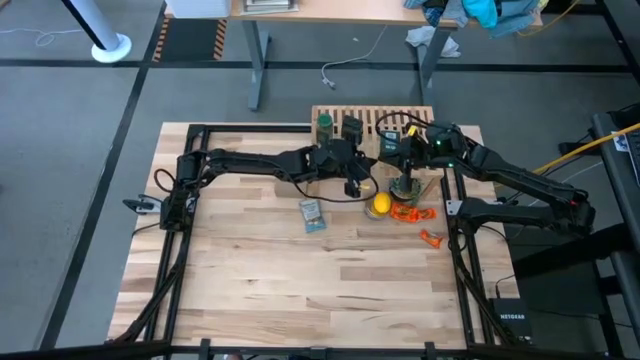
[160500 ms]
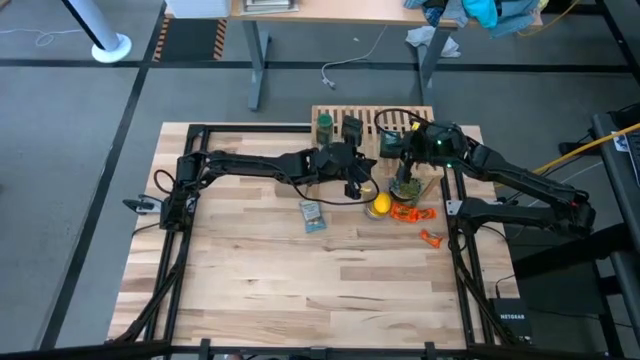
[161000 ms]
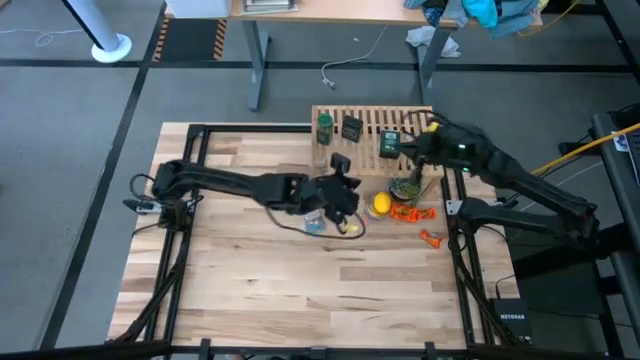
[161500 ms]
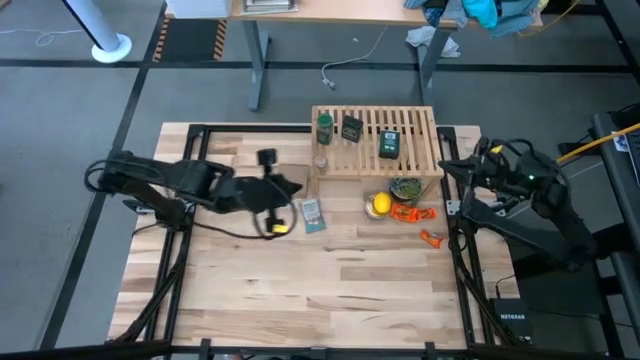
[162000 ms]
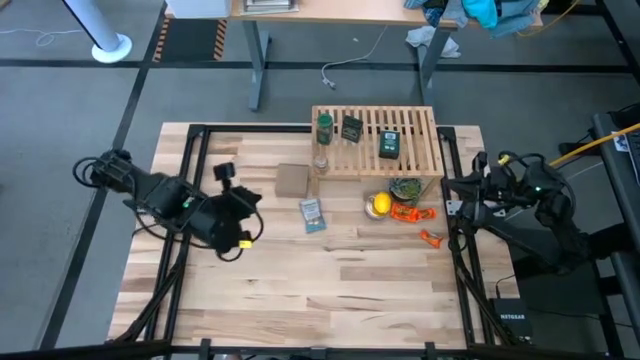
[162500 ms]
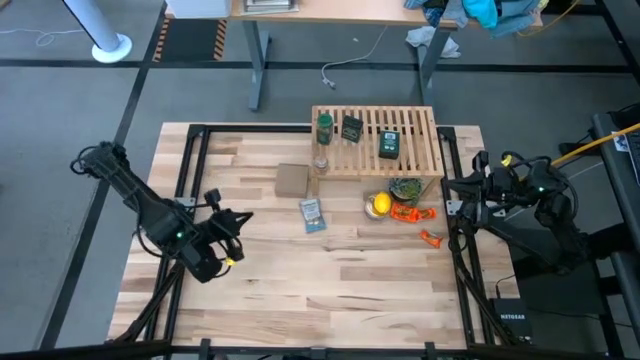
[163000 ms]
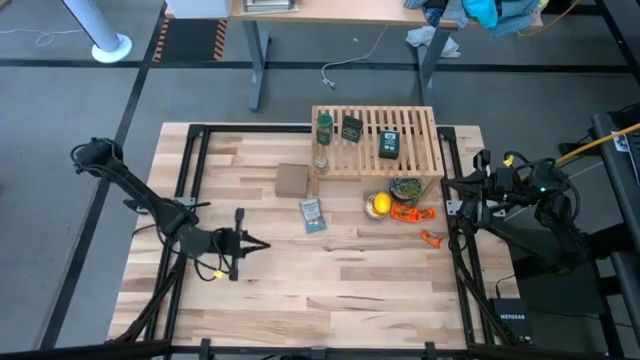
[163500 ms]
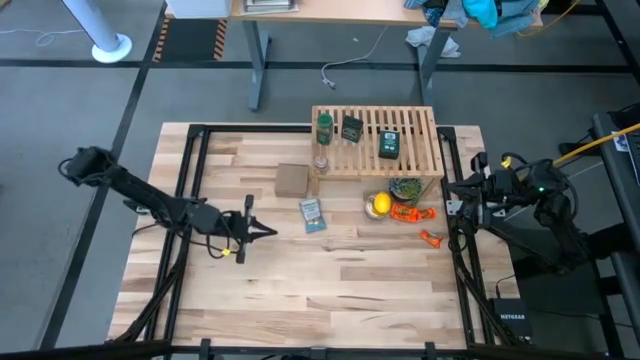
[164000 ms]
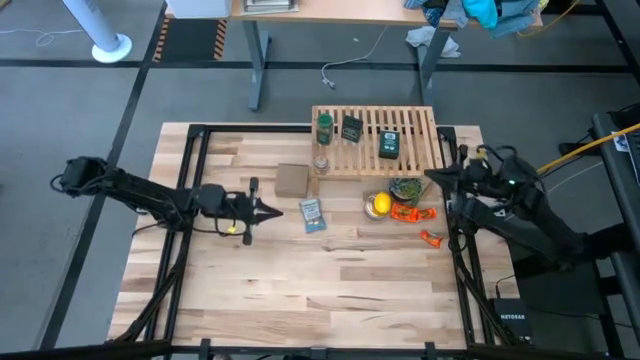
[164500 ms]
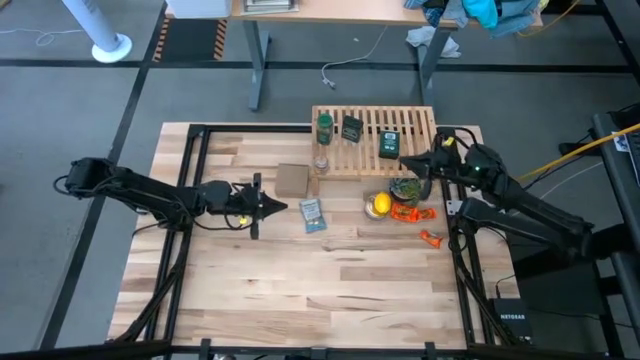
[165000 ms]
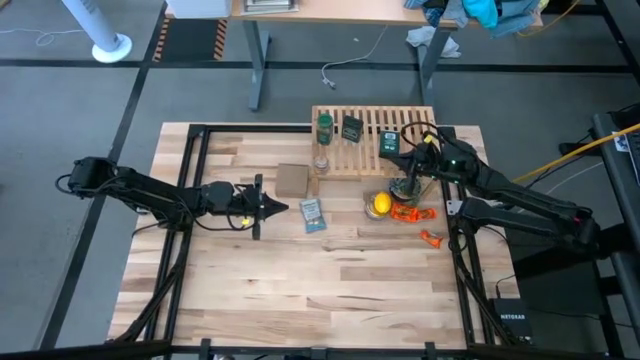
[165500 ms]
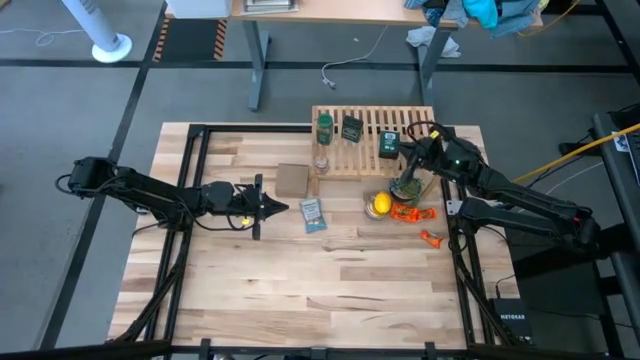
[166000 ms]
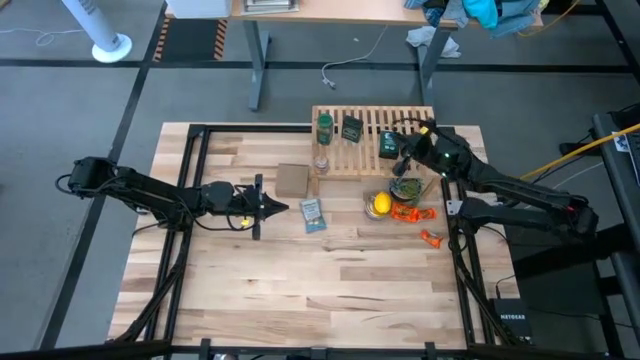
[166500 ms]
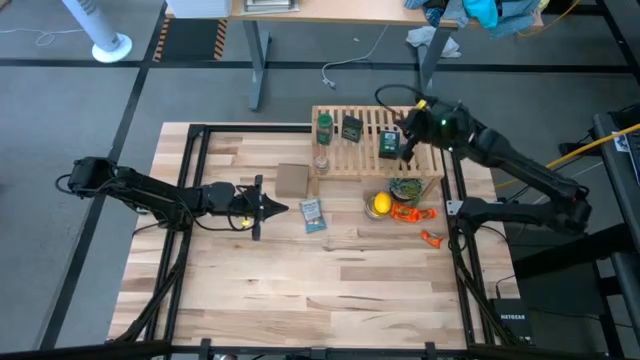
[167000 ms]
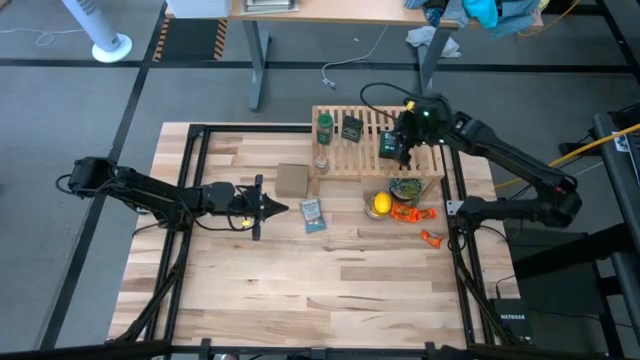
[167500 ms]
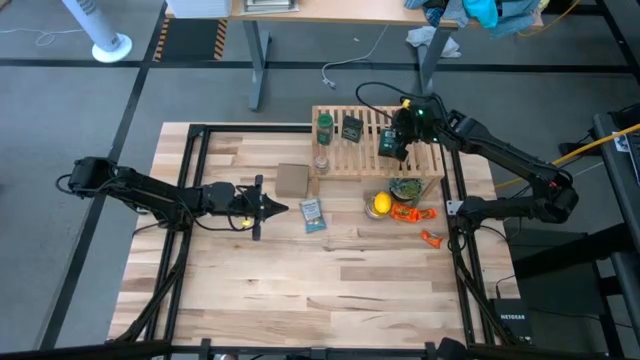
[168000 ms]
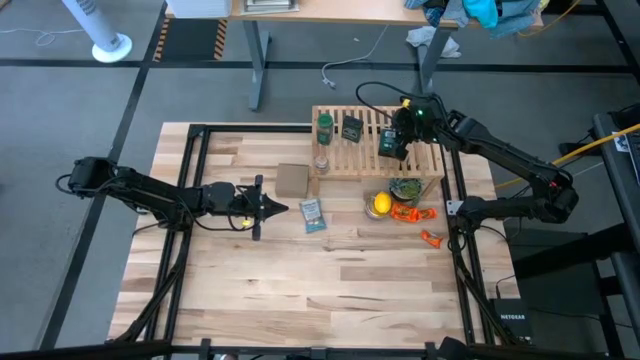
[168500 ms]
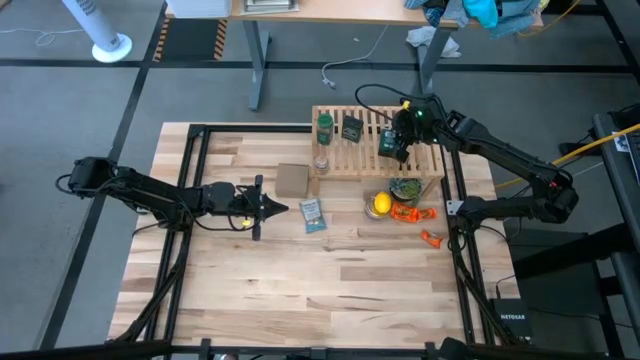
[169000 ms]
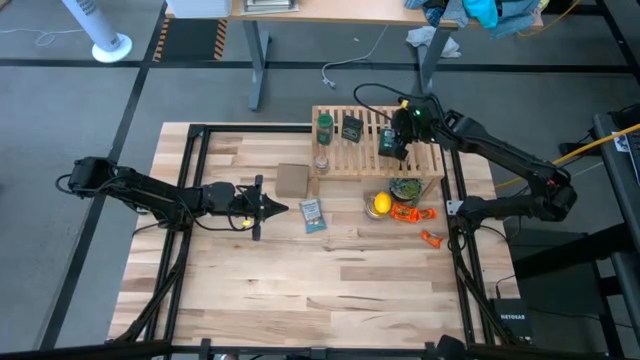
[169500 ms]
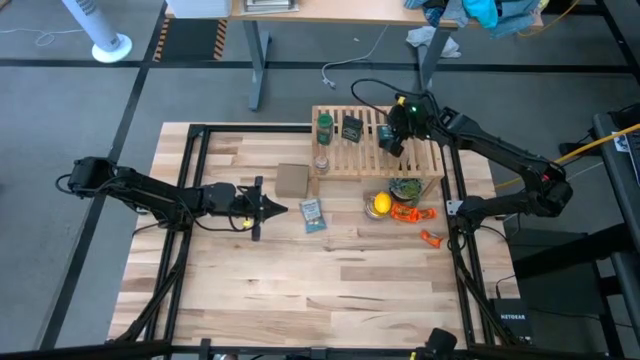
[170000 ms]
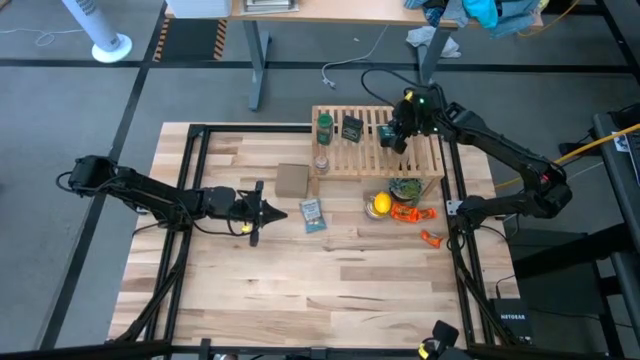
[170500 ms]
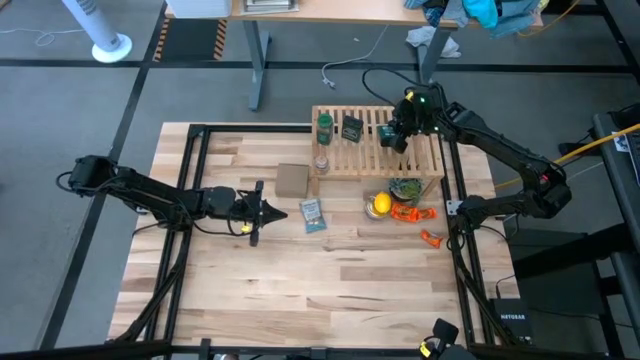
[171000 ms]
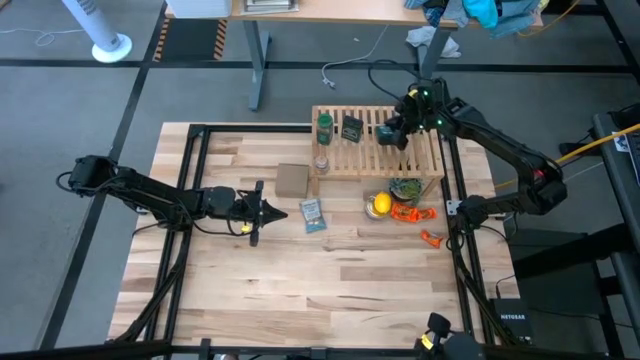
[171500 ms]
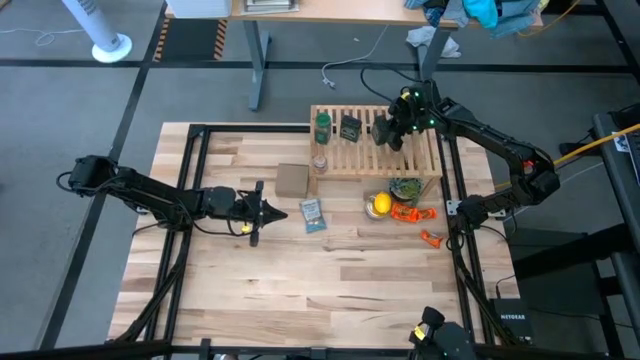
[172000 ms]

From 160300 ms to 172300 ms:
Task: Shelf spices
Adjust the right black seasoning can on the shelf

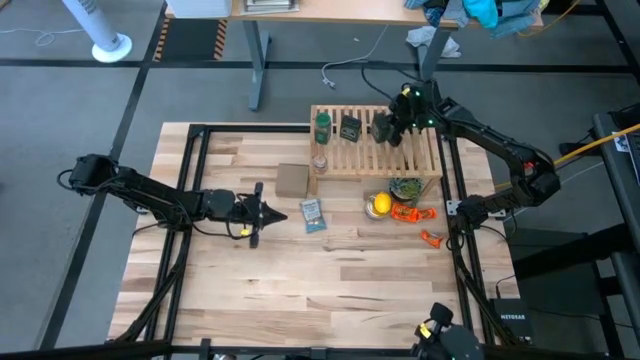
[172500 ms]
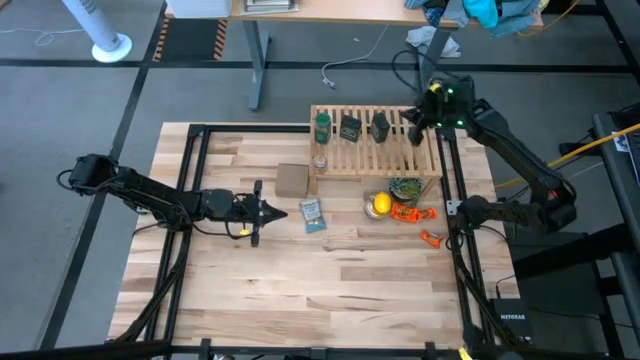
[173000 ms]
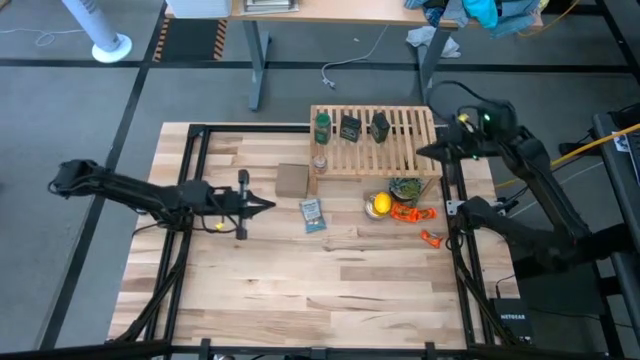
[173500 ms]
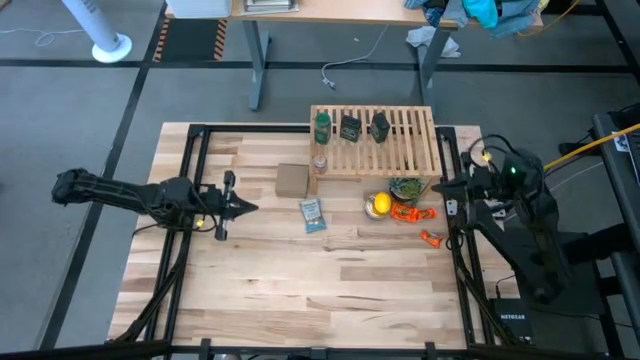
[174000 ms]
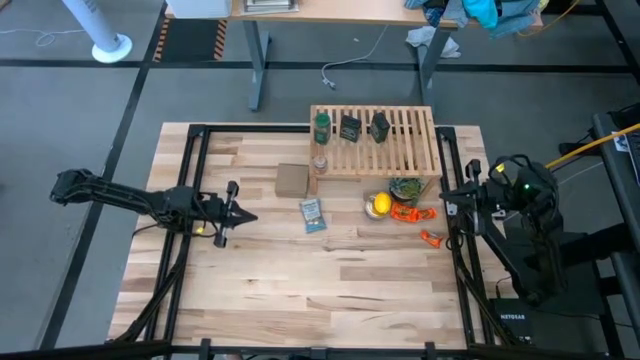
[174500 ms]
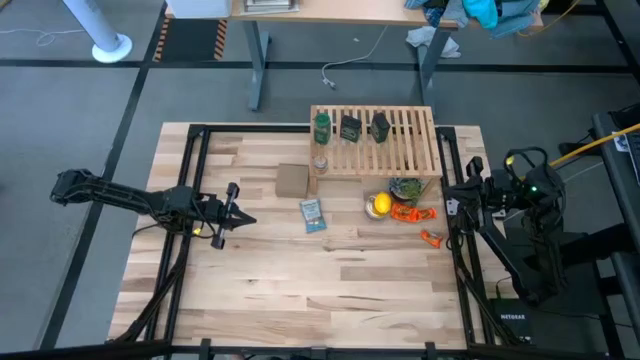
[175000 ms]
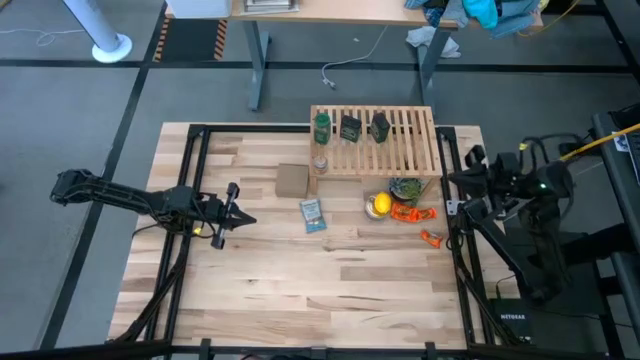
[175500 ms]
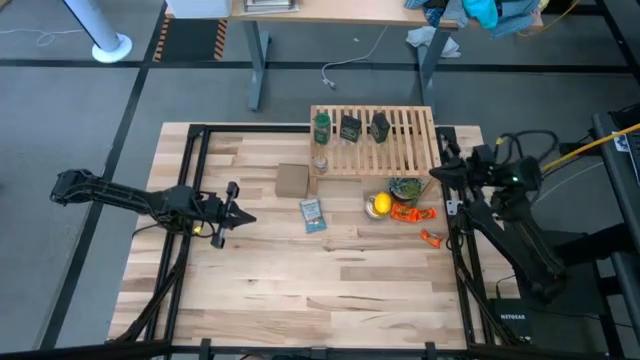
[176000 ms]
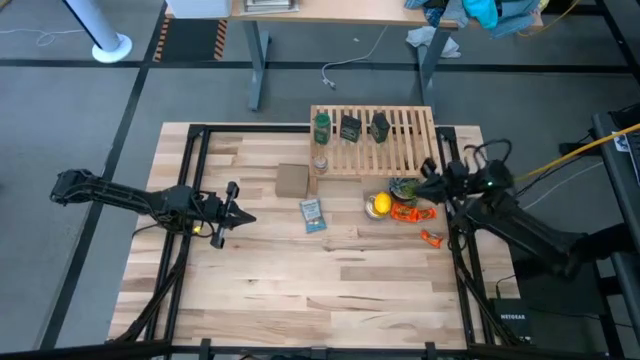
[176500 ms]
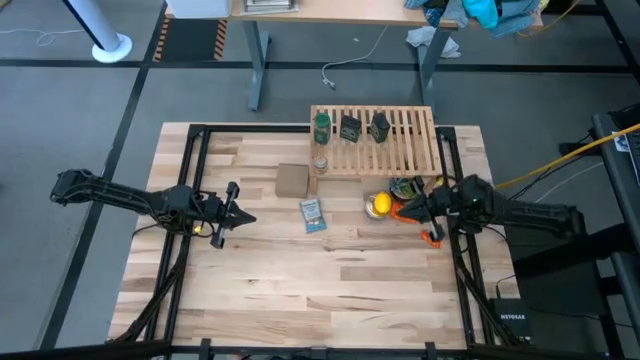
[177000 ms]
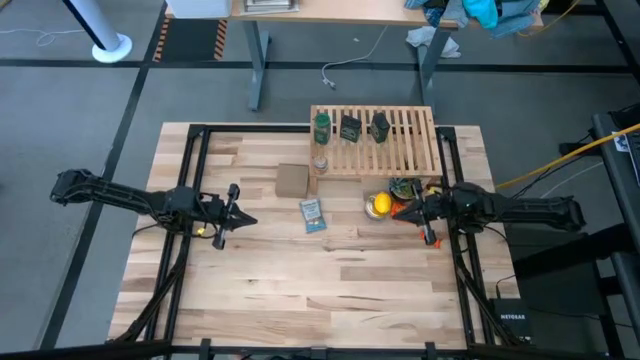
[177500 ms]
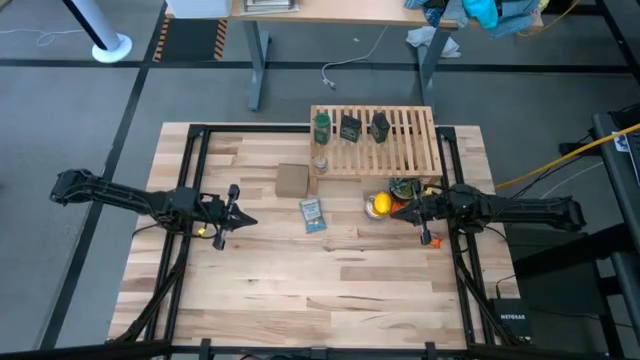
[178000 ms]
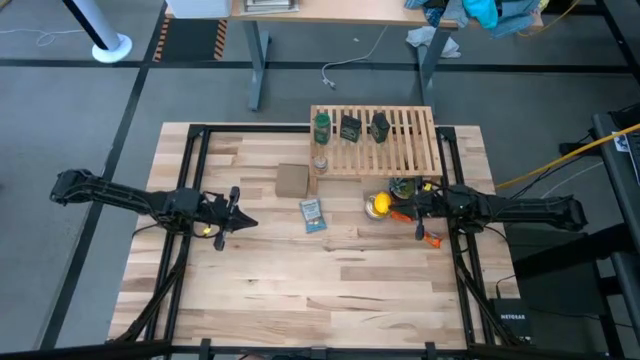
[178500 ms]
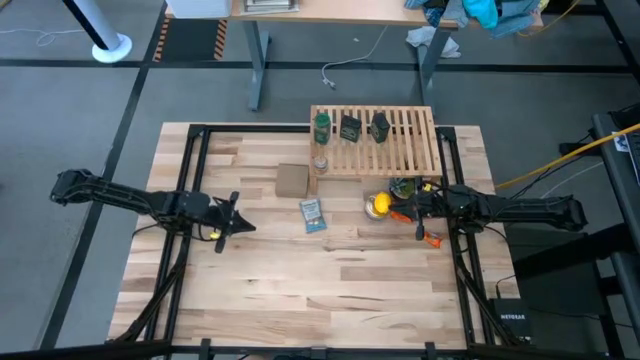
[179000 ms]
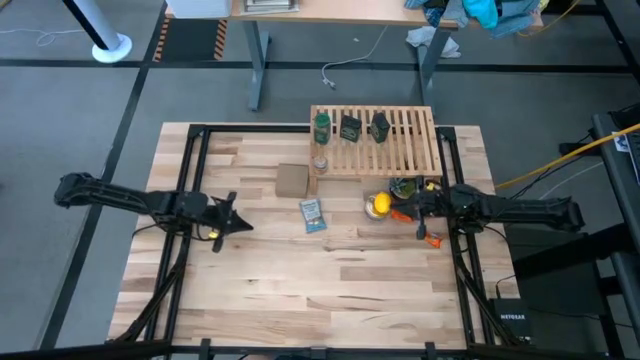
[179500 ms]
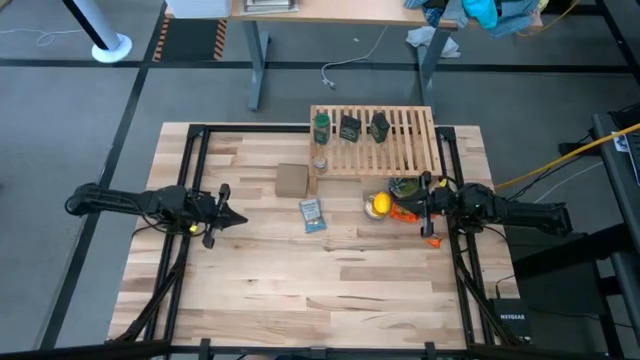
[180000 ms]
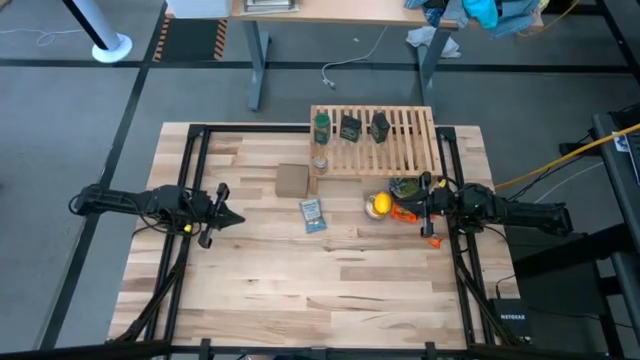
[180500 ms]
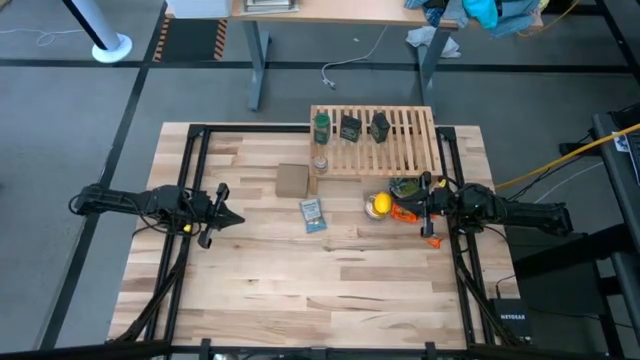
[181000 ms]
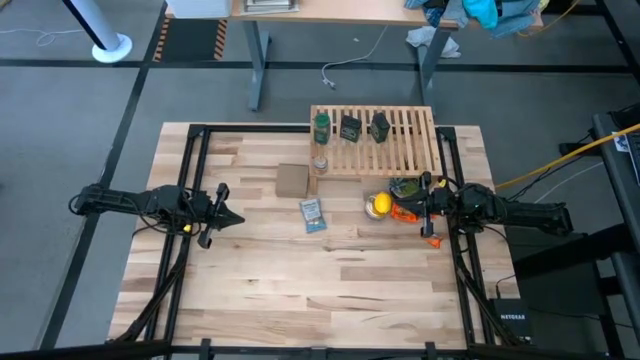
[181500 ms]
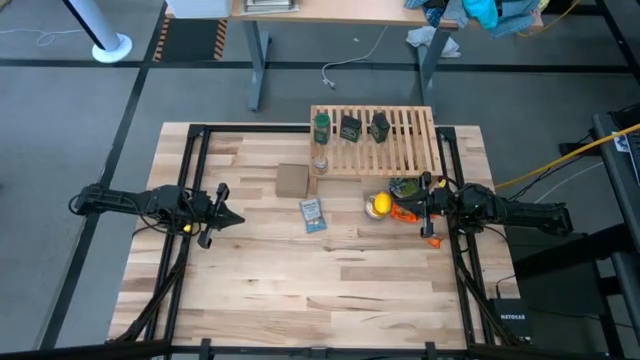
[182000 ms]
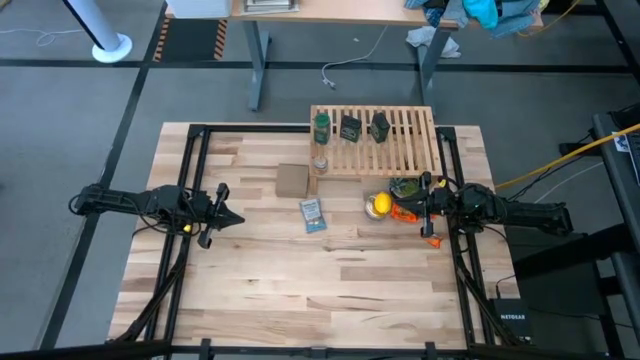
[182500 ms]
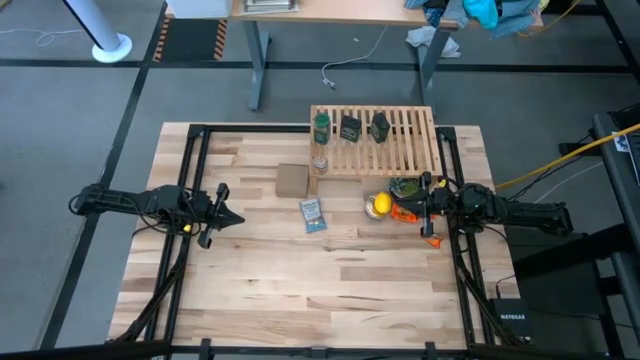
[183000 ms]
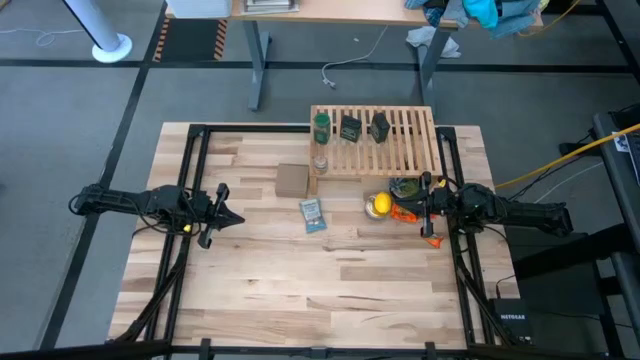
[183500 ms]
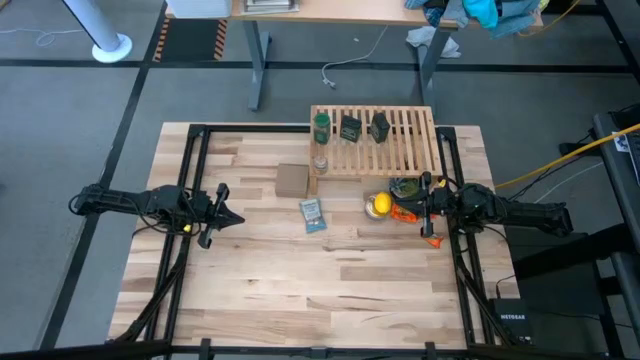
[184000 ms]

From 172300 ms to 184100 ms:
Return to Home Position
